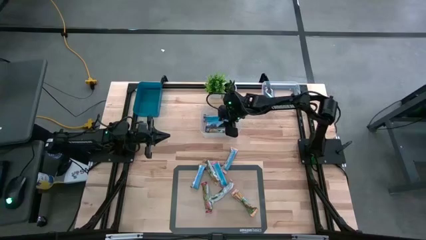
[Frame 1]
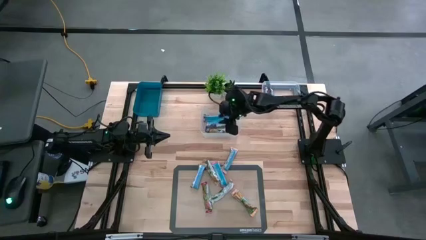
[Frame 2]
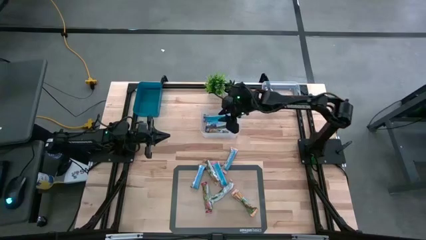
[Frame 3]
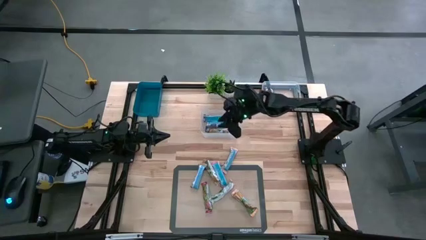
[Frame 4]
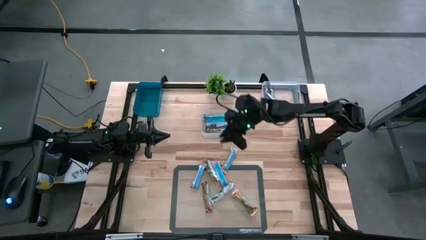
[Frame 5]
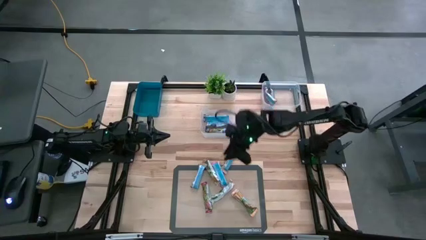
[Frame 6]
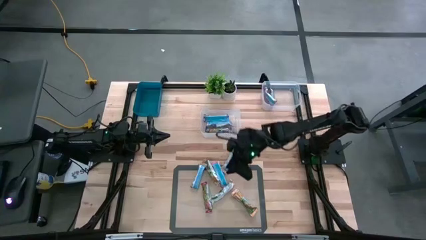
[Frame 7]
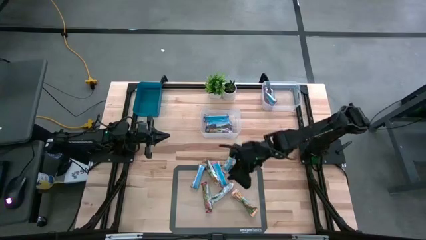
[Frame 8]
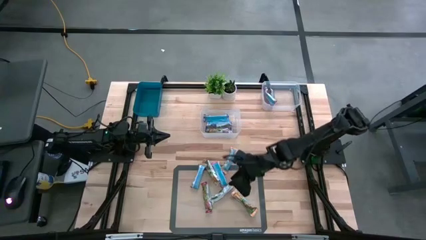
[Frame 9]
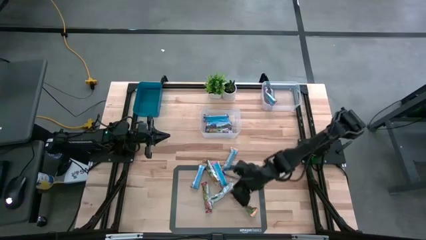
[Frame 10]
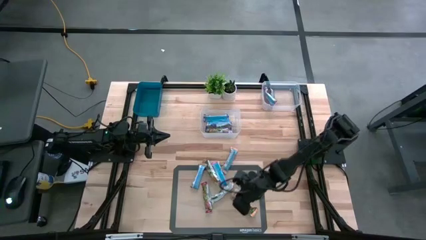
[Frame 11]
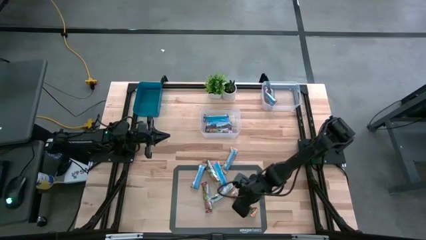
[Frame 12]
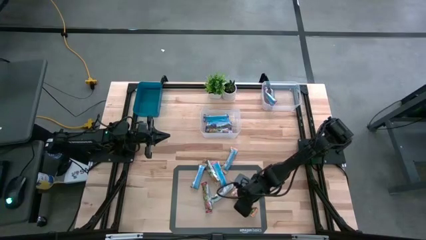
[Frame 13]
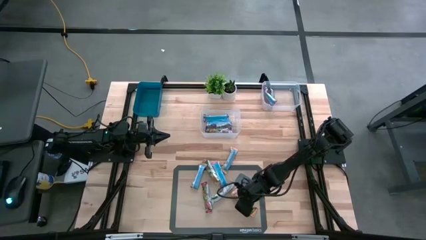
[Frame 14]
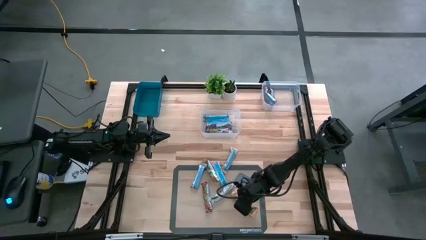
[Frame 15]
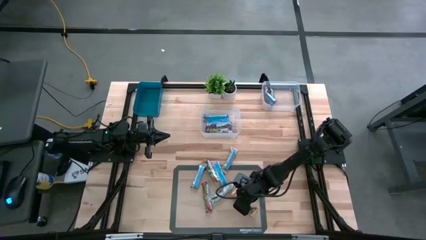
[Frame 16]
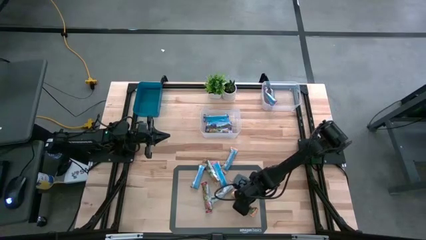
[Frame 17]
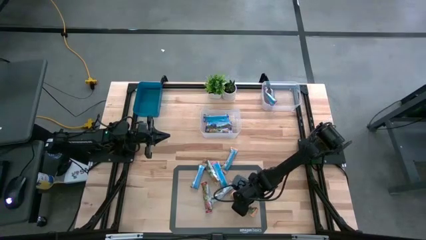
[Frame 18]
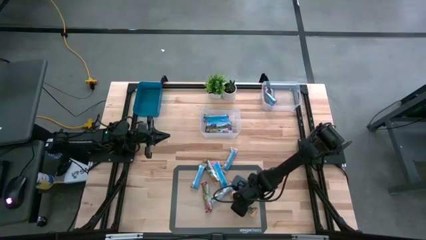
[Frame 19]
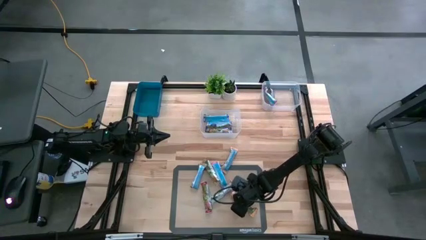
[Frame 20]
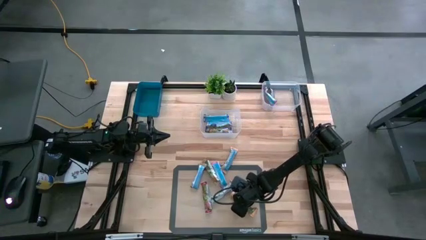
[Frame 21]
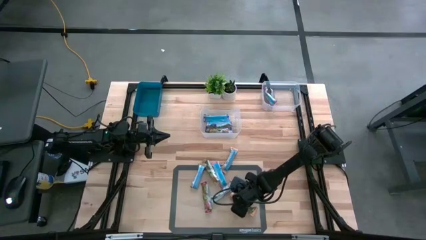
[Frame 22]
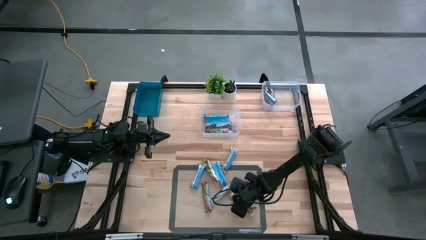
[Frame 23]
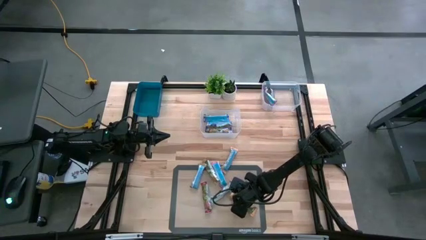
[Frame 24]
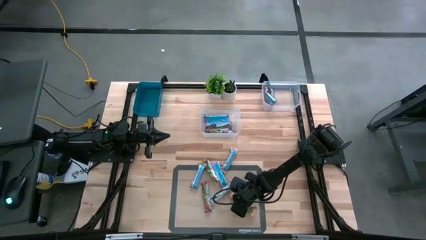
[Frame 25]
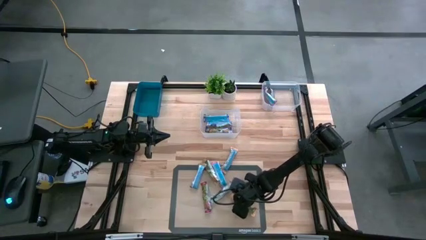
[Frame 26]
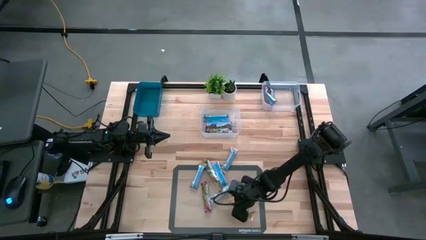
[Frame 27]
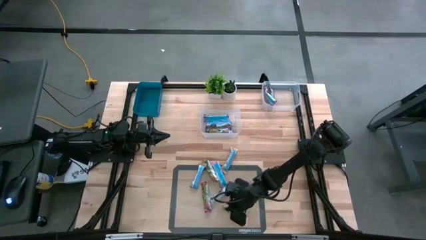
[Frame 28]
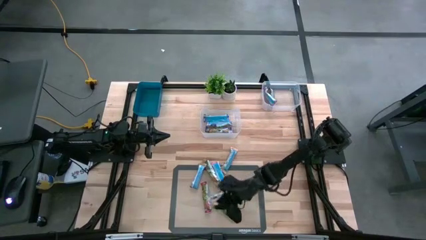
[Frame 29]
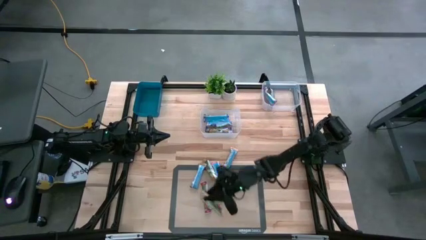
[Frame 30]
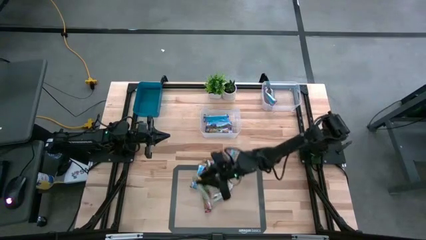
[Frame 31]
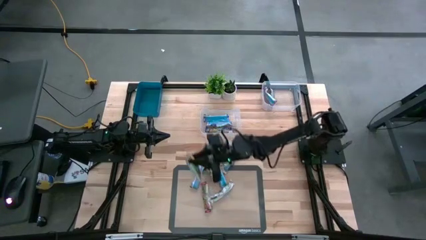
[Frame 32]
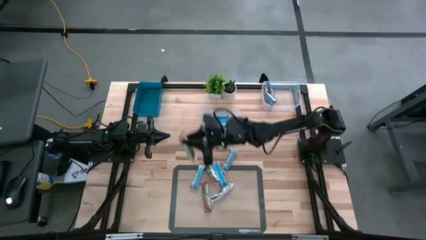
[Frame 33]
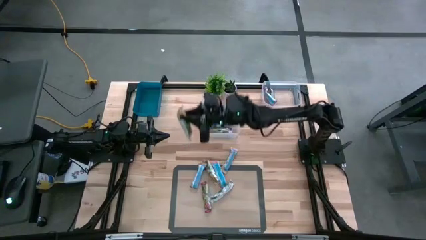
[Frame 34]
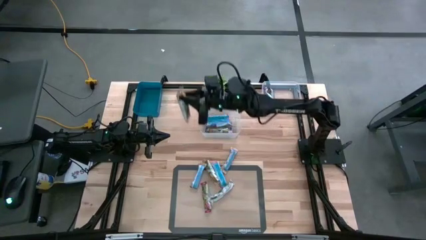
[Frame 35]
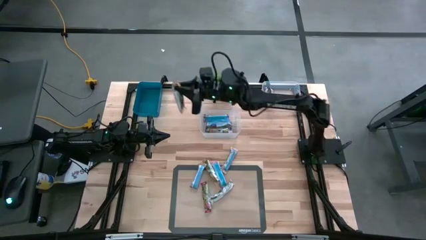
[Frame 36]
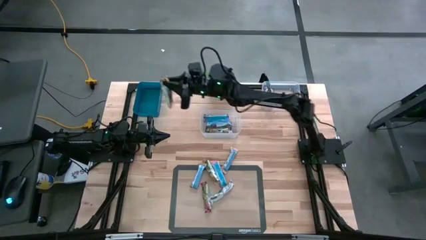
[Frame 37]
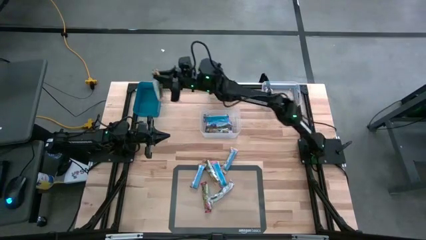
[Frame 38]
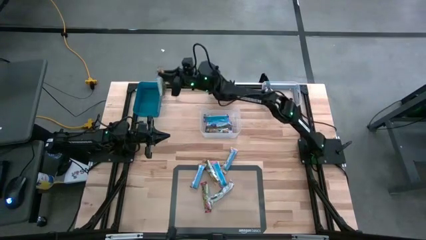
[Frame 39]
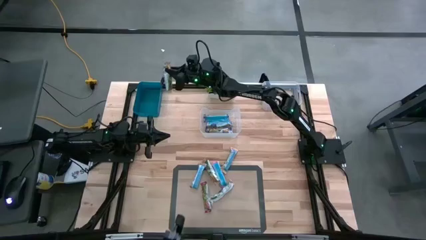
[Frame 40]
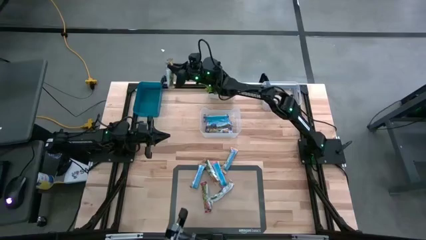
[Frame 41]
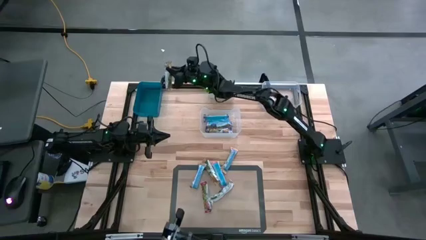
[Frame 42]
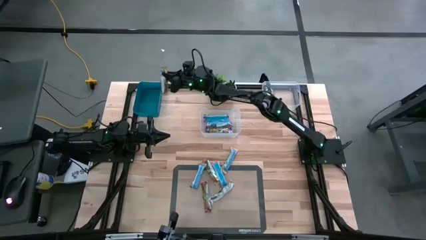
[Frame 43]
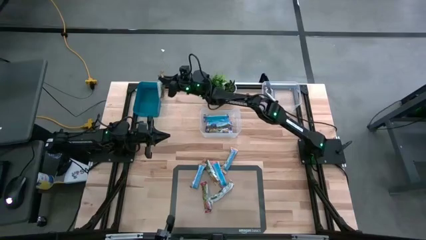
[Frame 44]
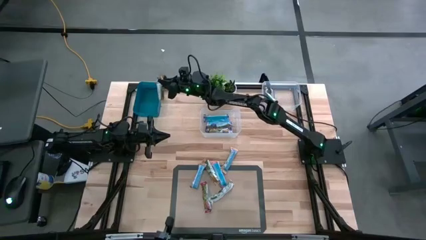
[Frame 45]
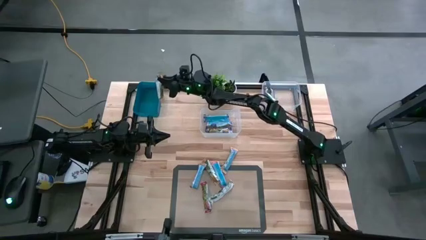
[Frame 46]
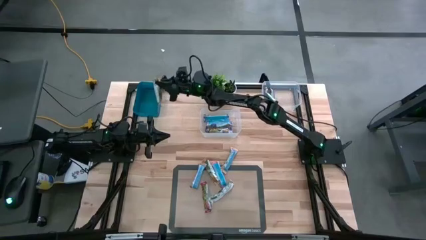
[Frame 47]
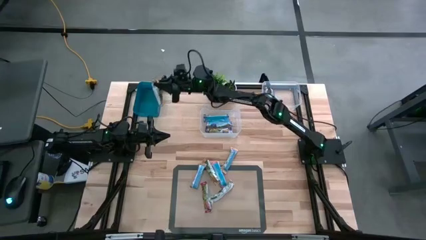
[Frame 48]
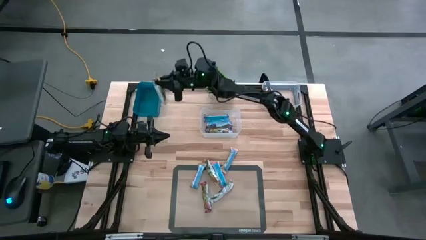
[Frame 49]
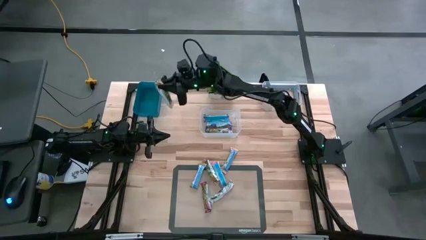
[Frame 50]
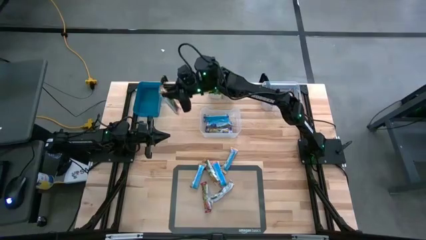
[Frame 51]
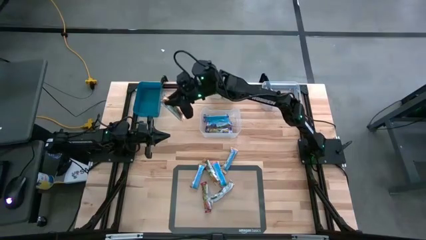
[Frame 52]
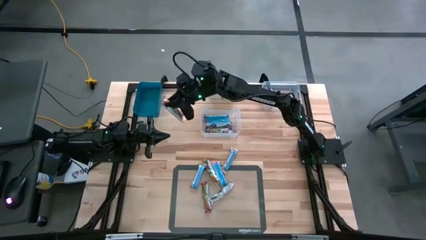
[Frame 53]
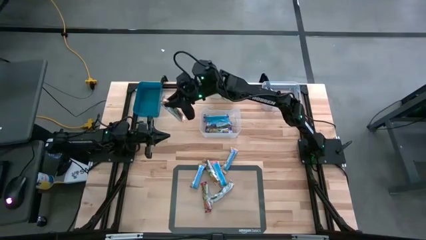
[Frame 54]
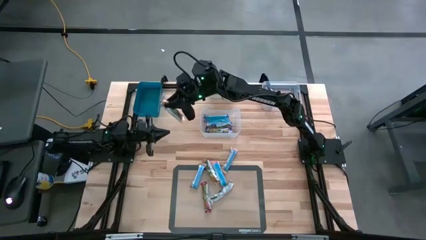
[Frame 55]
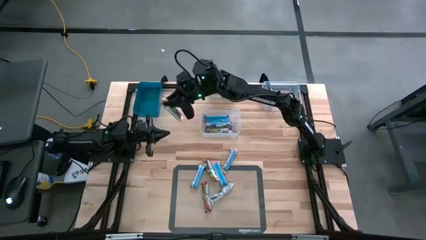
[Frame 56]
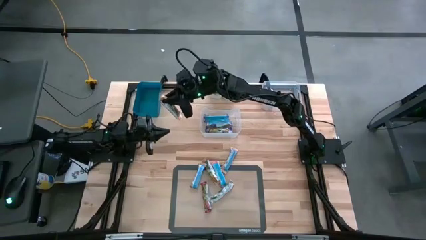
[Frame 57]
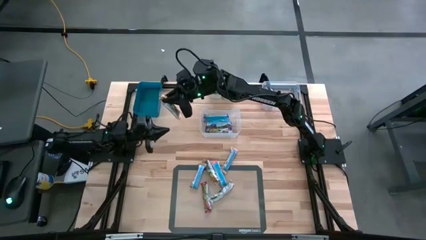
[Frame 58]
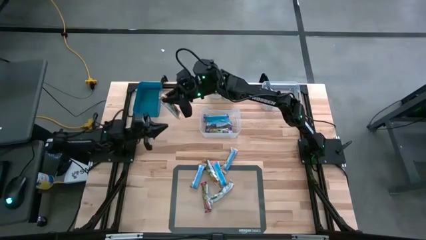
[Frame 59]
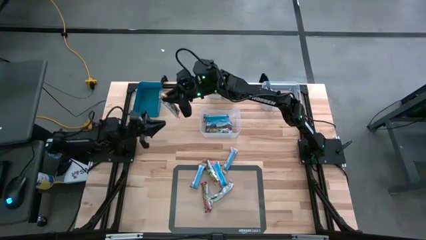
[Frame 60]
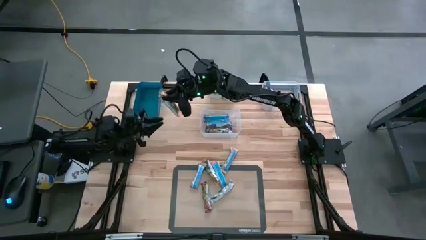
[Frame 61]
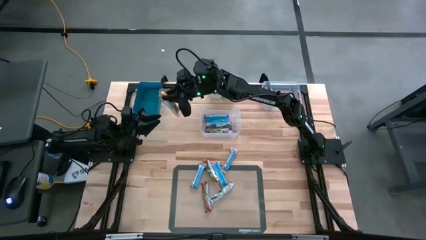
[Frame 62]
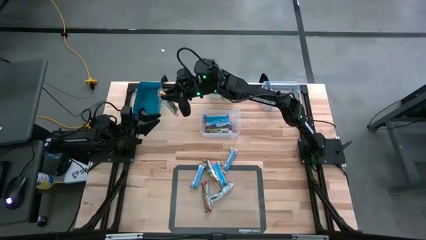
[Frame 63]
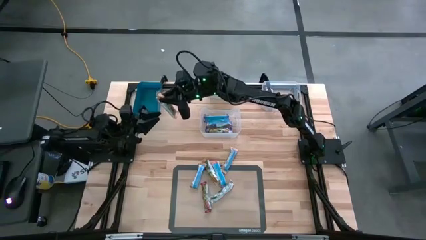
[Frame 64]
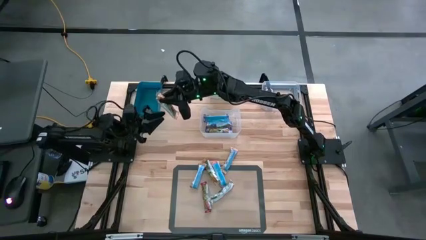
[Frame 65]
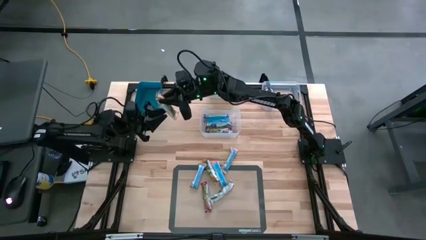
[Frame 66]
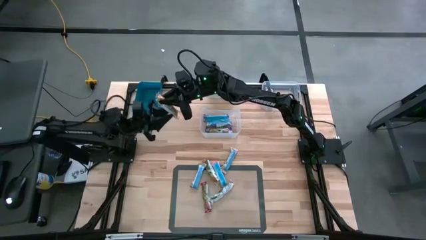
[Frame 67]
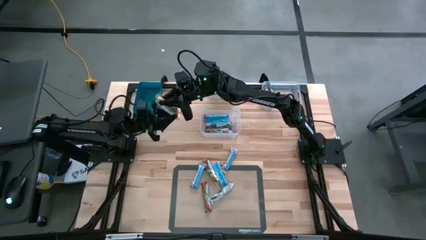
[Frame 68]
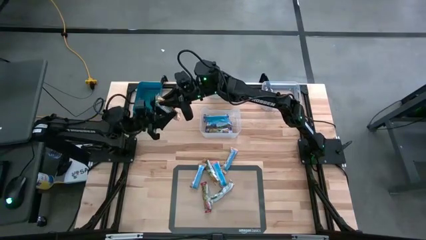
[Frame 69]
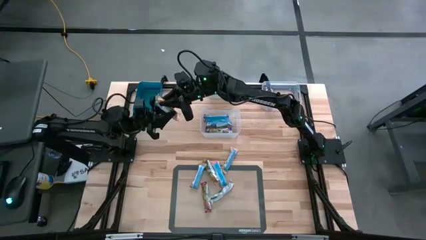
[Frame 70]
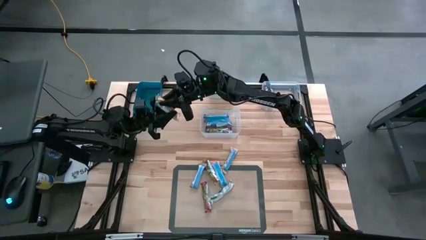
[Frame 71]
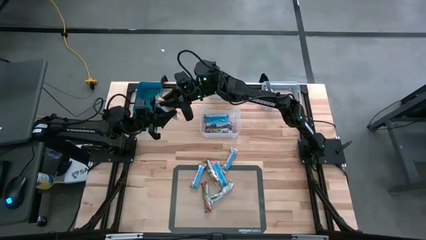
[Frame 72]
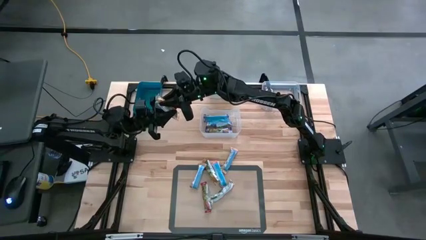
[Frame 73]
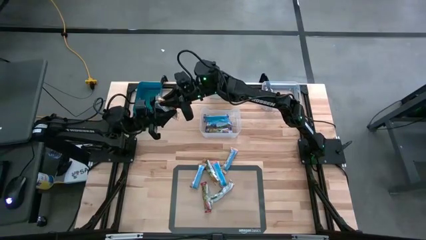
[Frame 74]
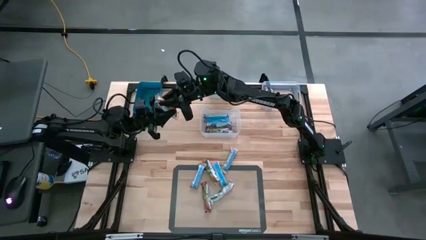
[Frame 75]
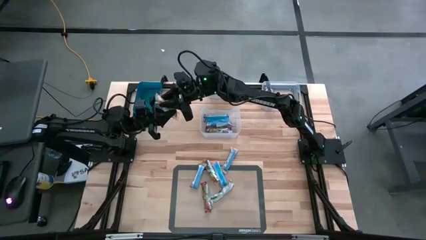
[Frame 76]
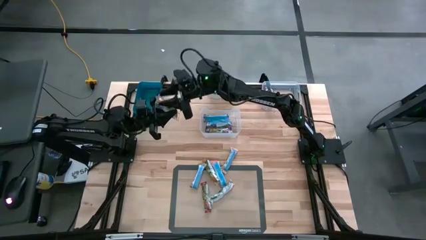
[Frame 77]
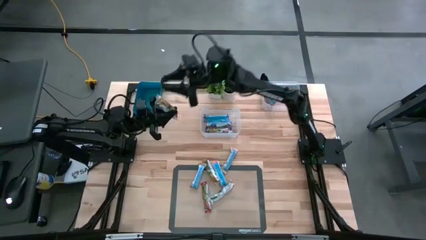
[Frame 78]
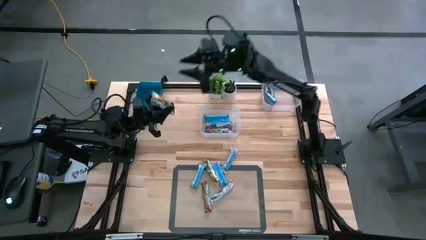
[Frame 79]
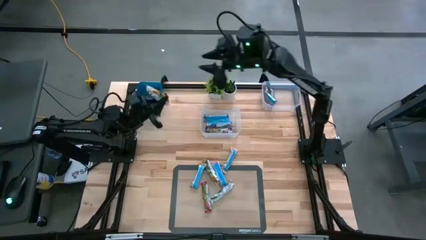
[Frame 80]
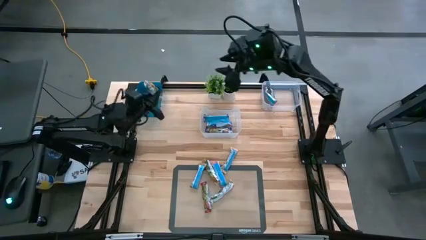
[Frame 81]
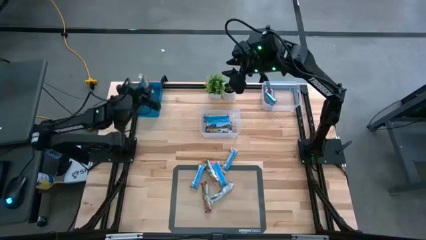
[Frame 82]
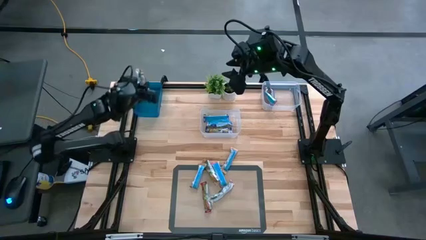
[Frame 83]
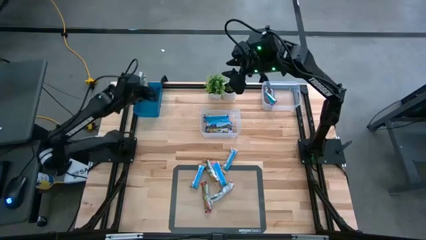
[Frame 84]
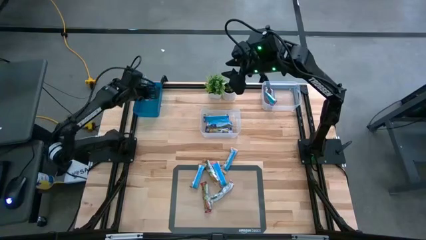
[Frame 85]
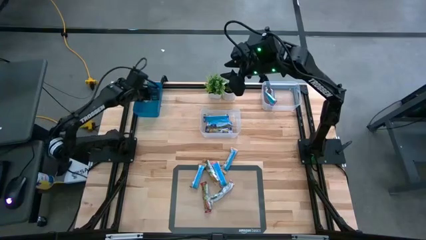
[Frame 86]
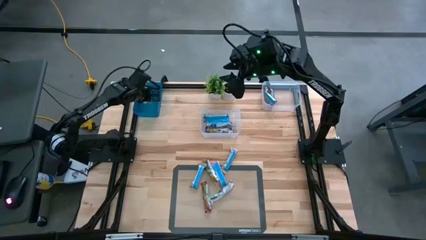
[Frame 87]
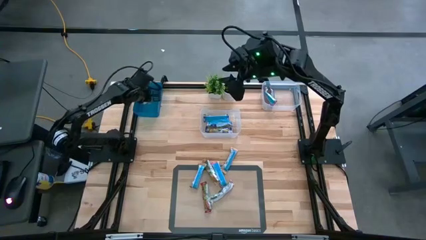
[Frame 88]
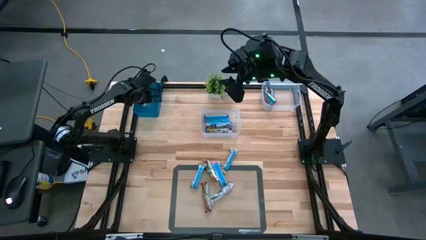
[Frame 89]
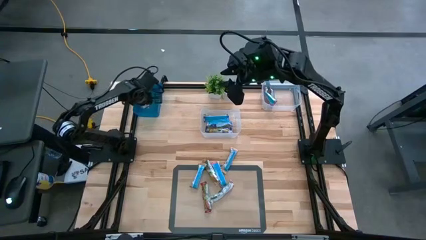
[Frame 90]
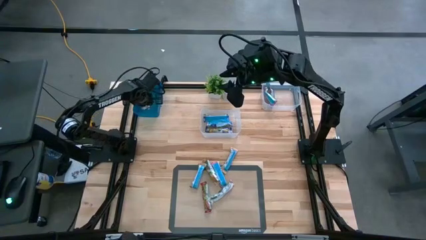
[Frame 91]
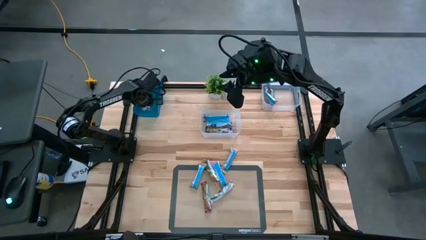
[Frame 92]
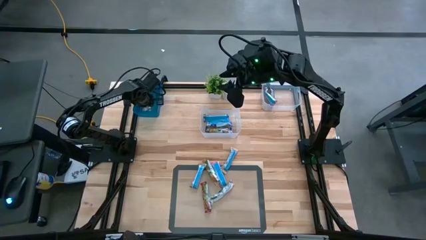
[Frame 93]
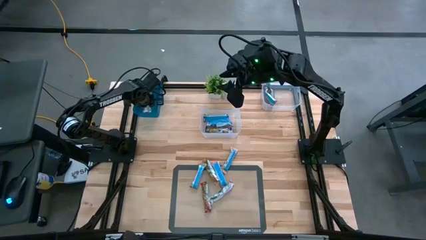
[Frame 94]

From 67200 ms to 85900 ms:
Task: Pick and place Granola Bars by type
Put the orange granola bar in the blue bin
